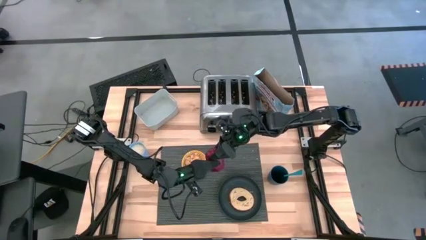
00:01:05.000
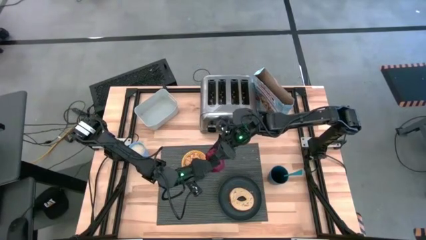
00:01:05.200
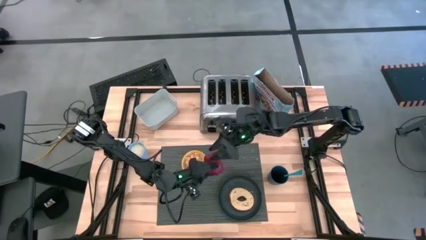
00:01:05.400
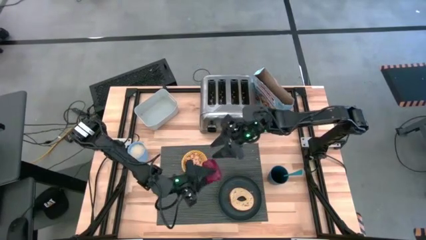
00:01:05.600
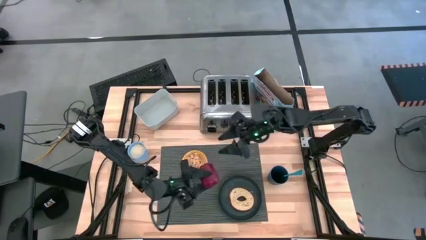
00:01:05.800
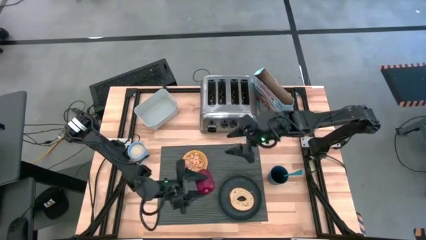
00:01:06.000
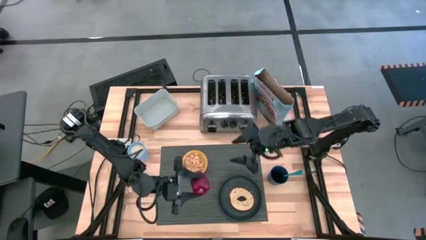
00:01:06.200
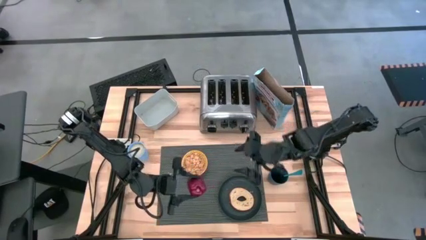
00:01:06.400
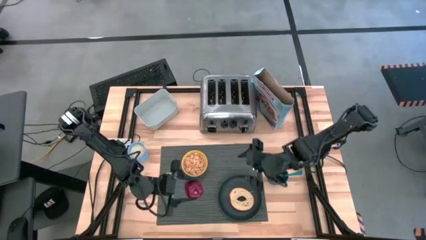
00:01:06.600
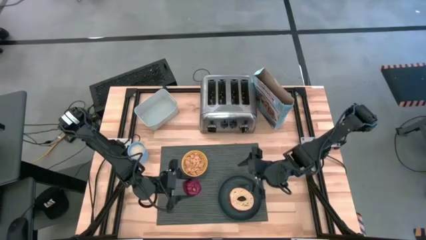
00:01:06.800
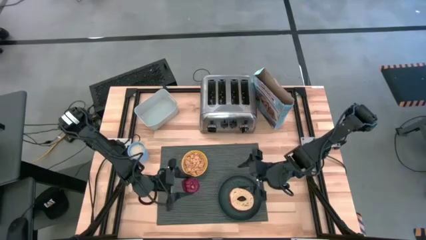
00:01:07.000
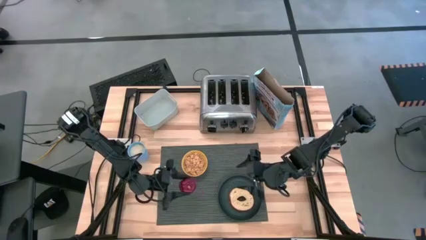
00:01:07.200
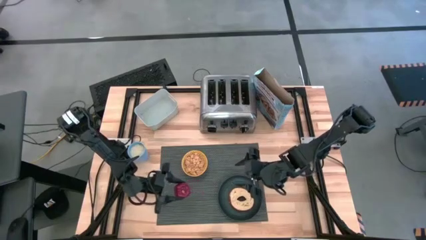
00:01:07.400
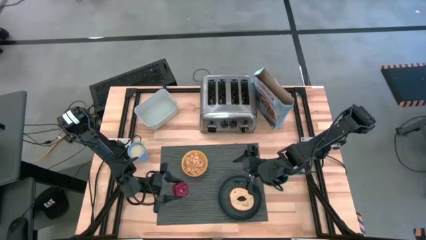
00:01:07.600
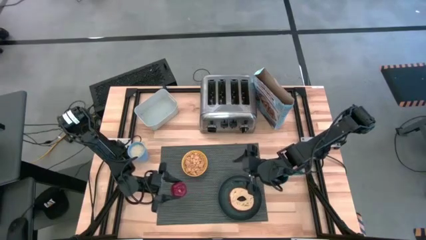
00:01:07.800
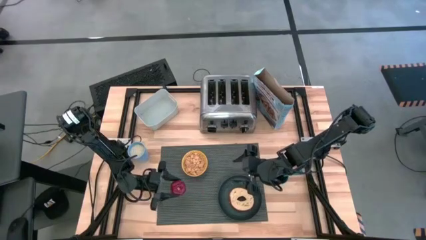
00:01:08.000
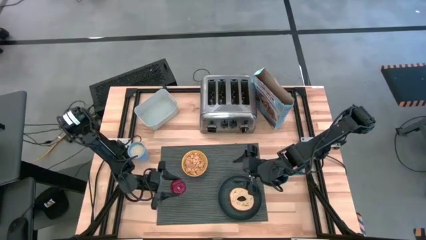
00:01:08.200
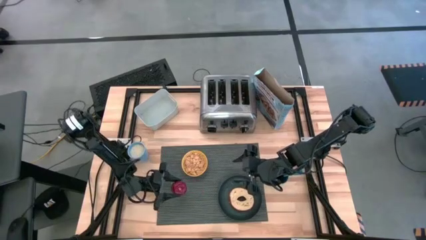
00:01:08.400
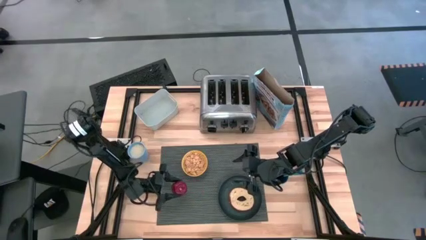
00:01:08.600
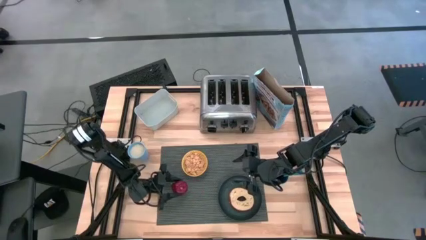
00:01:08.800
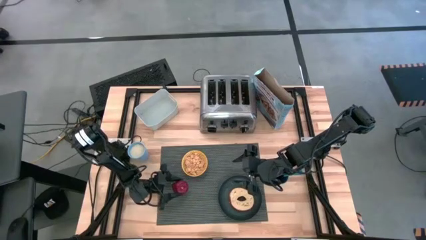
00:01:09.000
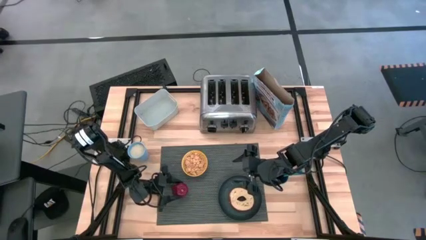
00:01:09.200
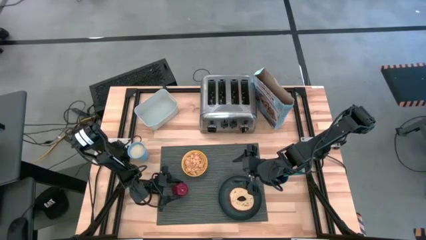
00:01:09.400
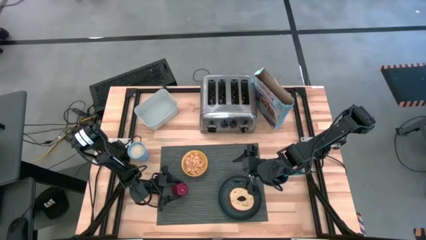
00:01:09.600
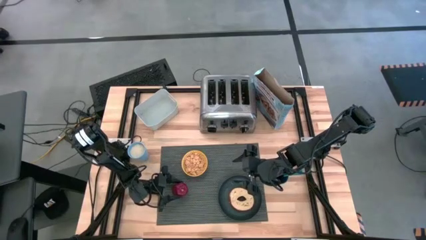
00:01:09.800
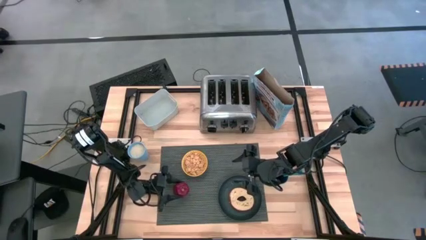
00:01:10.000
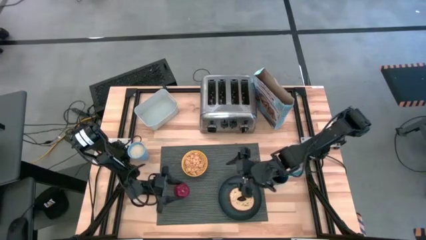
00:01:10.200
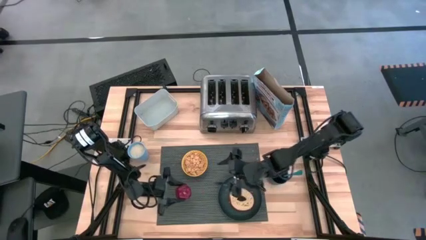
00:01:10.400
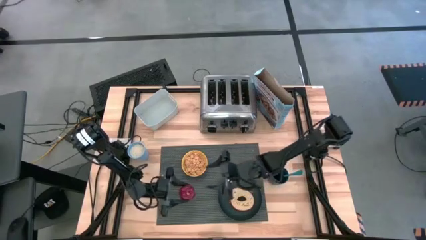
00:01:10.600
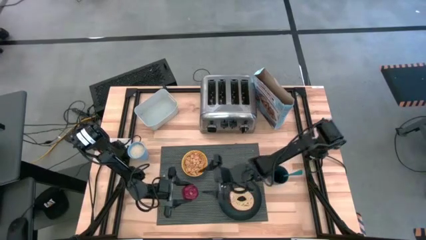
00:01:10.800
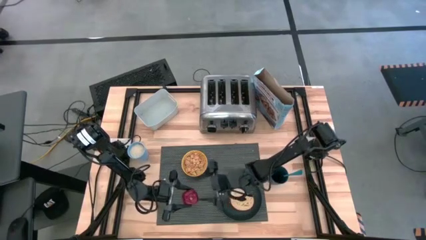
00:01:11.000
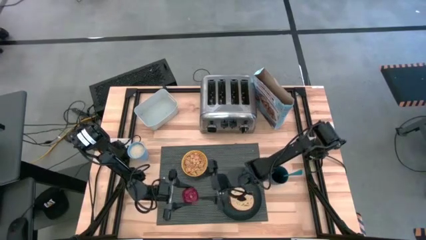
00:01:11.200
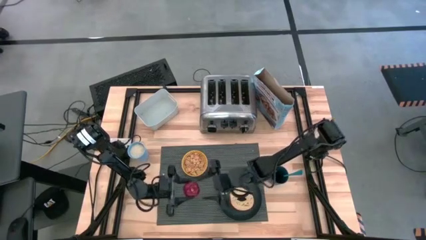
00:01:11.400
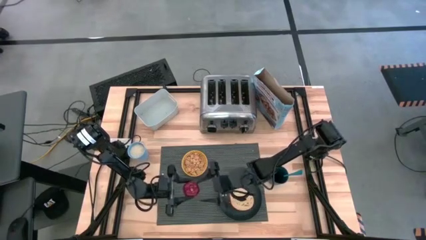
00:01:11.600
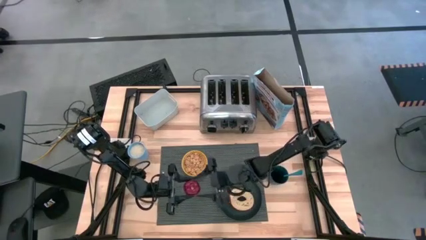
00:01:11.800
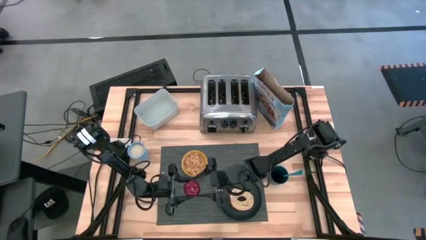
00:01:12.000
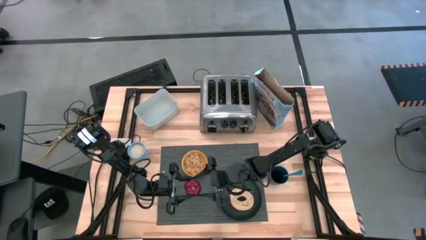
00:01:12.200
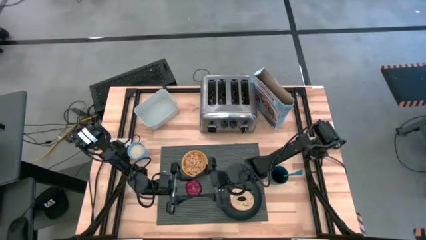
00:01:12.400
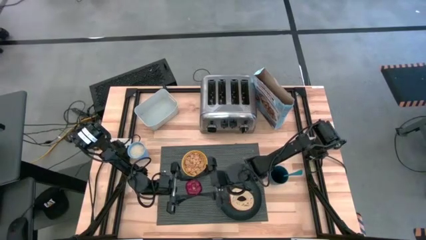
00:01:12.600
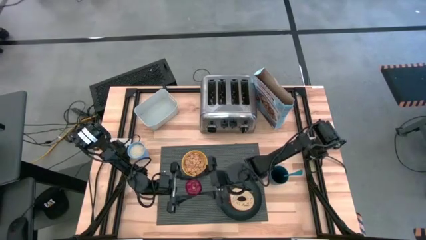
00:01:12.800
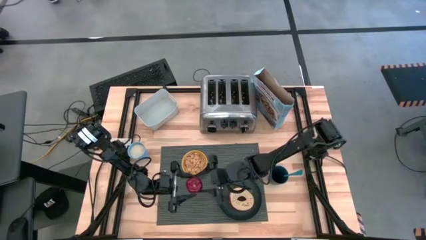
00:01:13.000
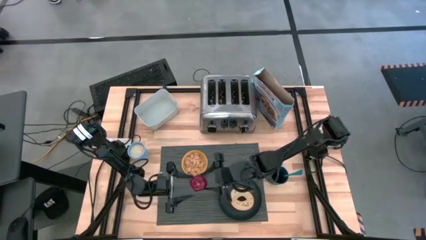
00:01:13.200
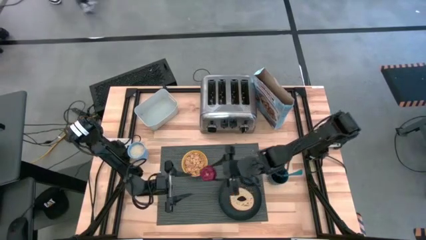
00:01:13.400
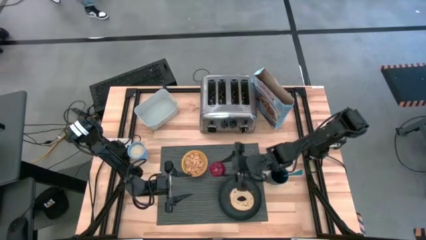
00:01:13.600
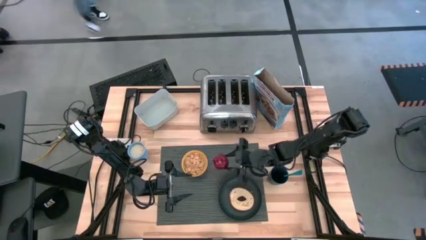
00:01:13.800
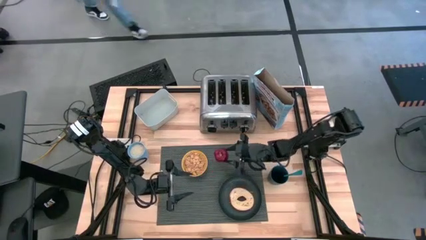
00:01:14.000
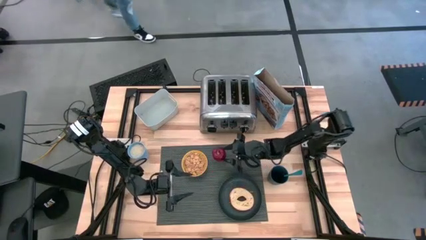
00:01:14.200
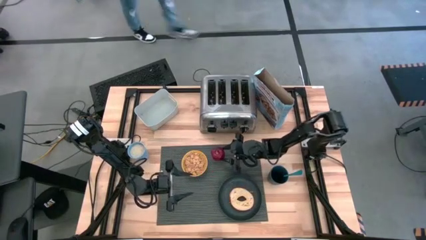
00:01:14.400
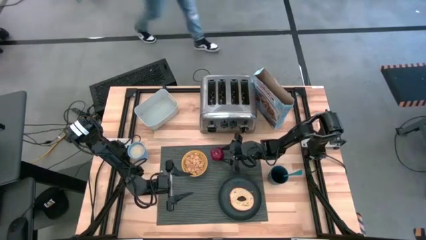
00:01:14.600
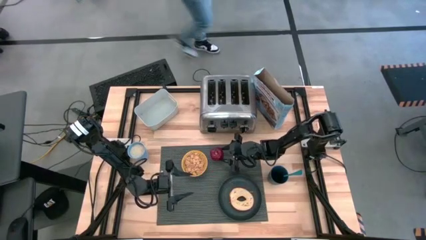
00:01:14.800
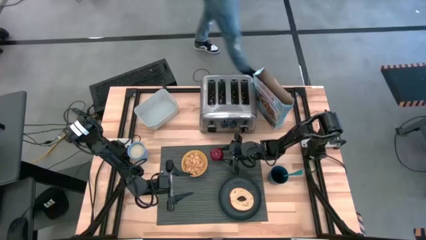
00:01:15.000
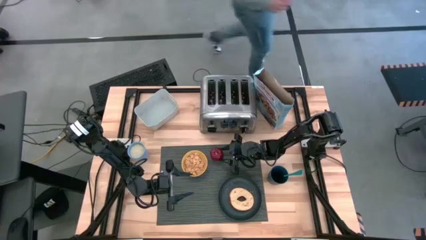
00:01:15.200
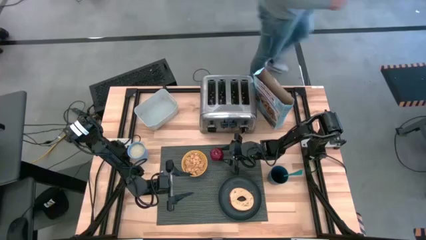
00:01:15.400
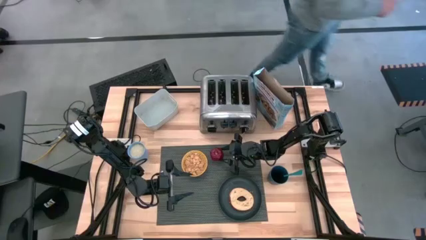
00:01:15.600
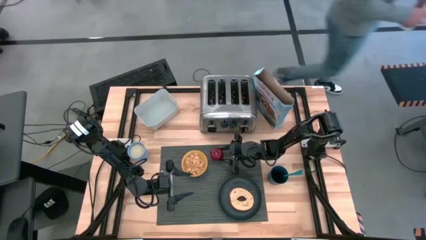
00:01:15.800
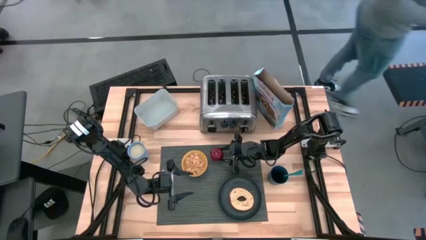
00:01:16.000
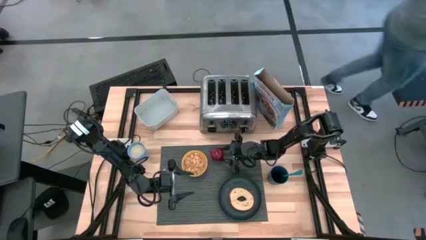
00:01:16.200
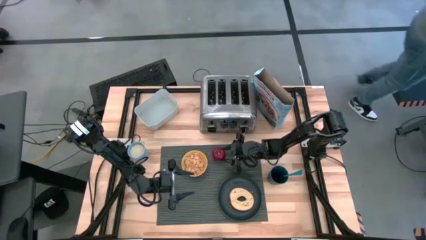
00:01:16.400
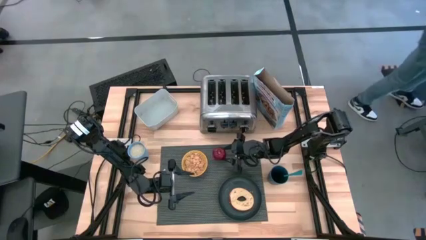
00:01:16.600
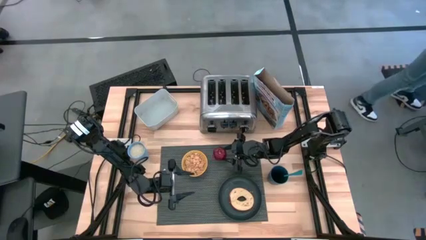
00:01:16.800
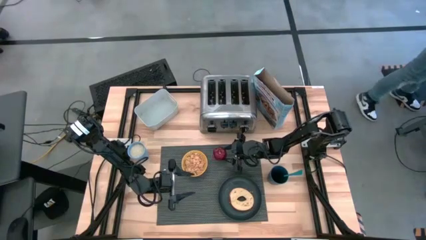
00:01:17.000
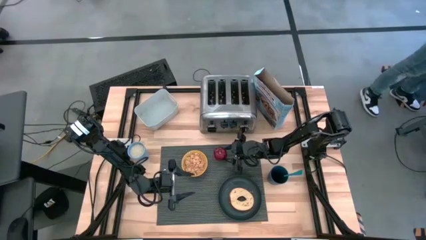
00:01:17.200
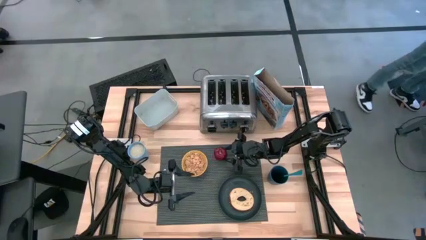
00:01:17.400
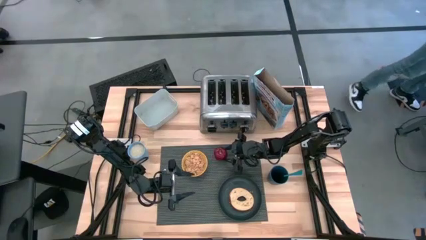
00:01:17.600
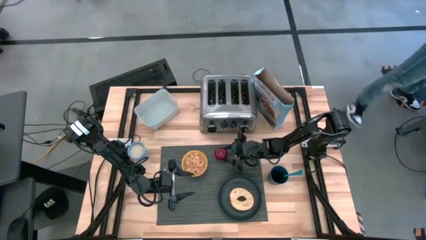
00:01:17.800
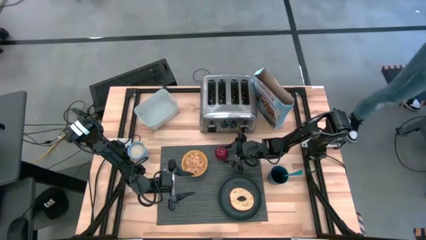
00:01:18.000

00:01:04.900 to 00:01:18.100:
Task: Arrange a breakfast setting
Put the apple on the gray place mat to the right side of the yellow bowl

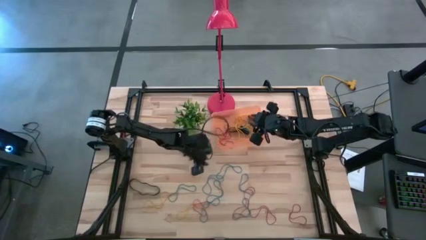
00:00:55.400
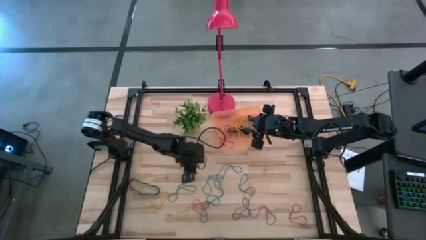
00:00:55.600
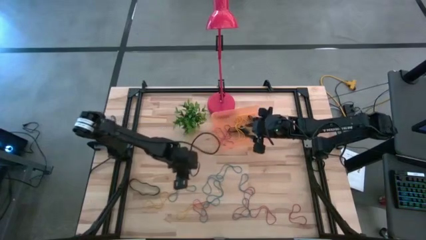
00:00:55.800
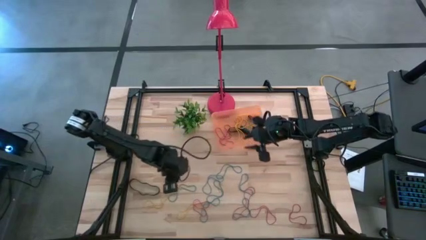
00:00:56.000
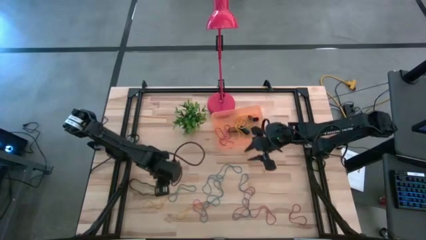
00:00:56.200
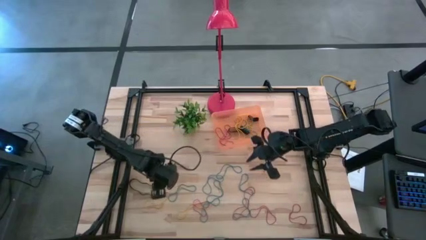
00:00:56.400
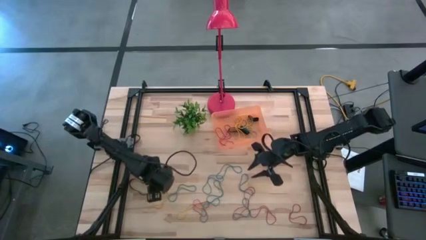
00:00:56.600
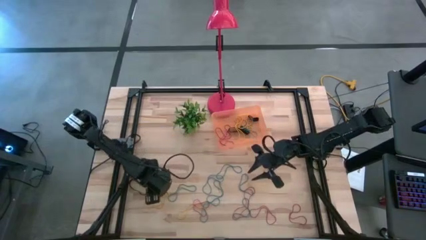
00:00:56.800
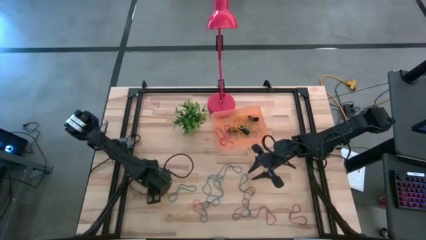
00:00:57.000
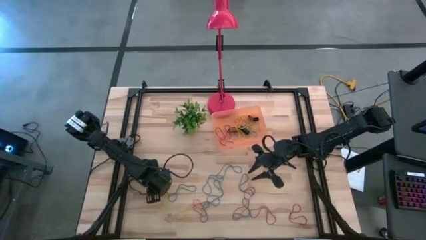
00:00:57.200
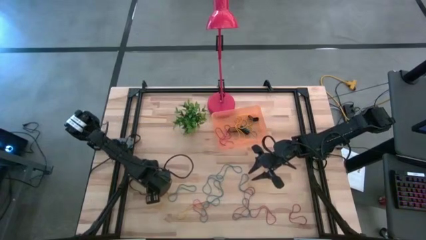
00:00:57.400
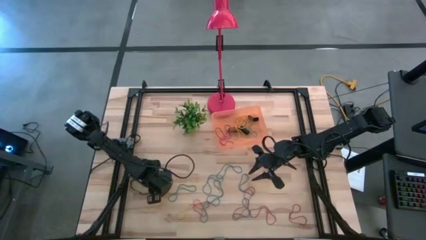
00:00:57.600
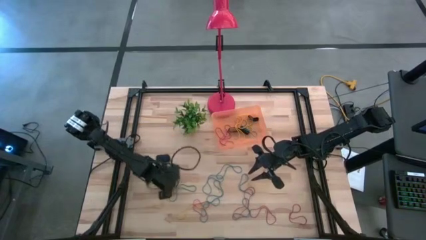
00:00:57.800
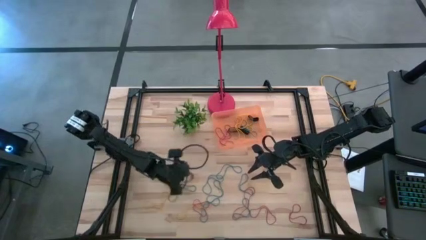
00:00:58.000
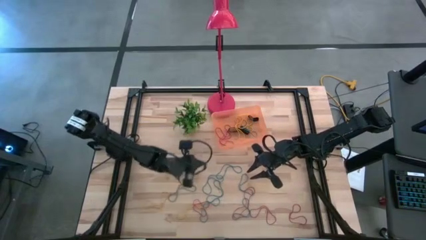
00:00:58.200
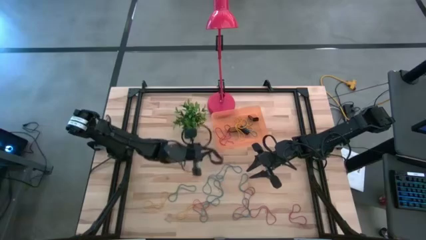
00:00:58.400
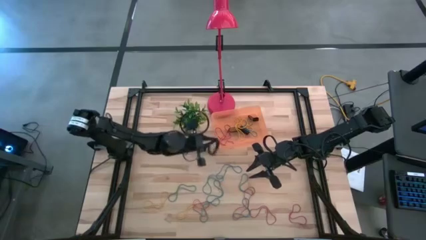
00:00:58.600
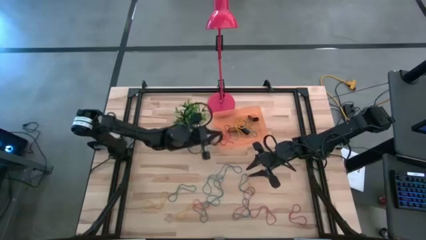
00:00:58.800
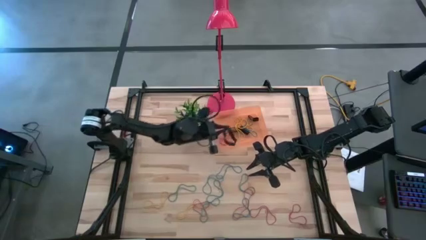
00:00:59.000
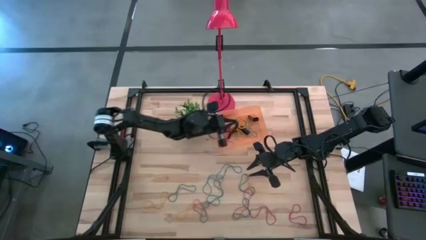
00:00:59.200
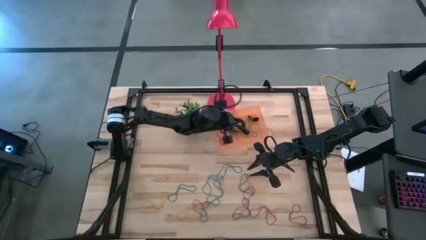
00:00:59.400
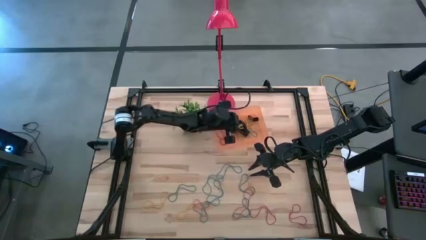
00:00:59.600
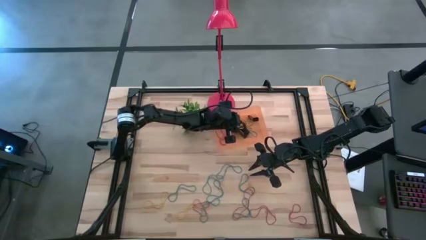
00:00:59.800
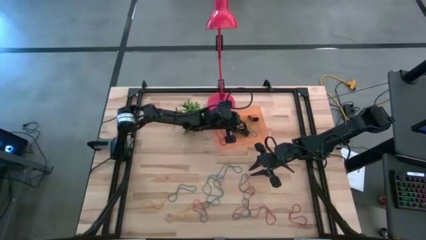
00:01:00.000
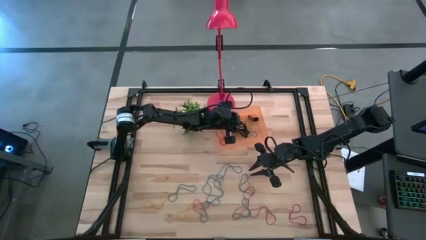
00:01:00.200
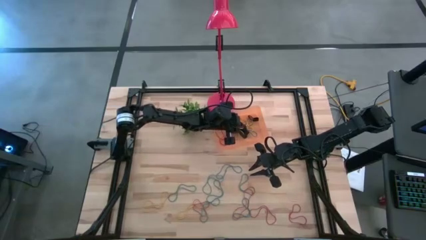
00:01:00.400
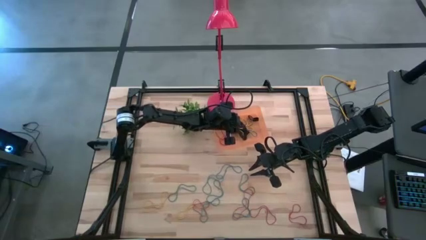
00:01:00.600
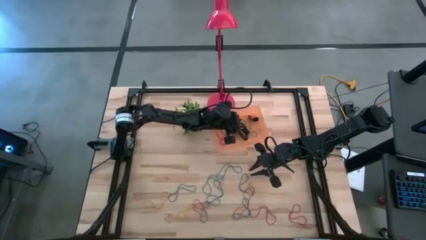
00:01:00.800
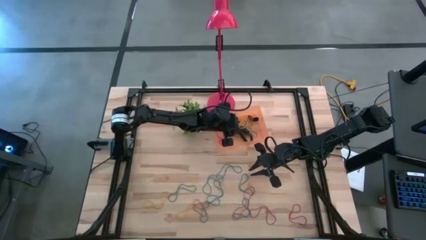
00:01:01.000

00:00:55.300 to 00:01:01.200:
Task: Pick and place rubber bands into bin
Put the big black rubberband into the orange container
